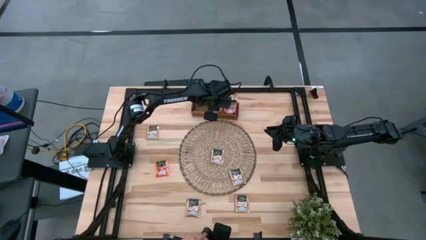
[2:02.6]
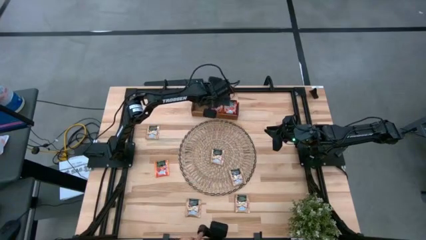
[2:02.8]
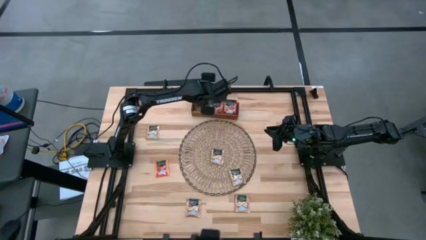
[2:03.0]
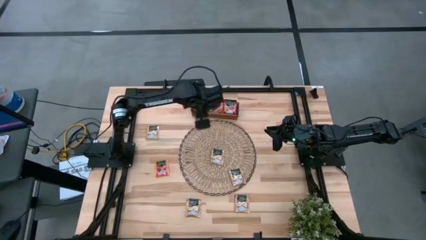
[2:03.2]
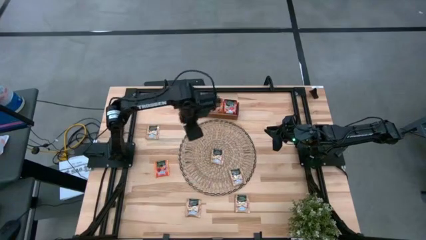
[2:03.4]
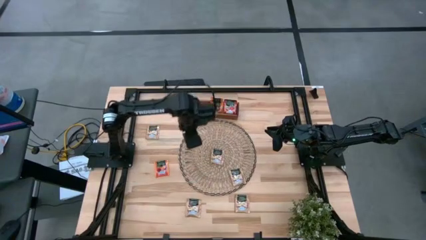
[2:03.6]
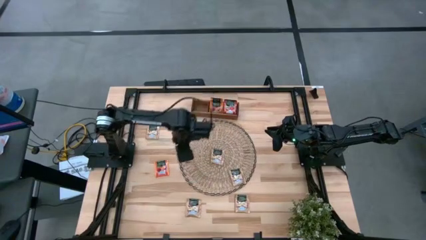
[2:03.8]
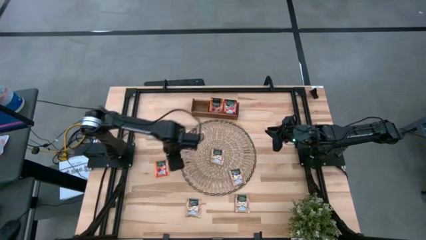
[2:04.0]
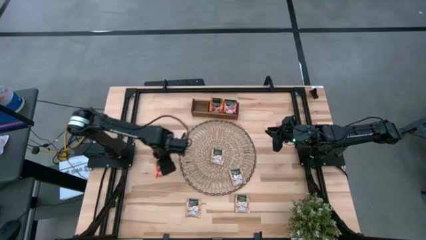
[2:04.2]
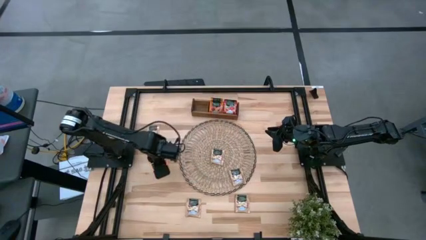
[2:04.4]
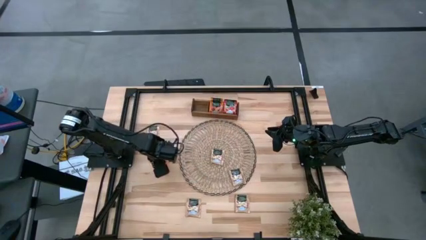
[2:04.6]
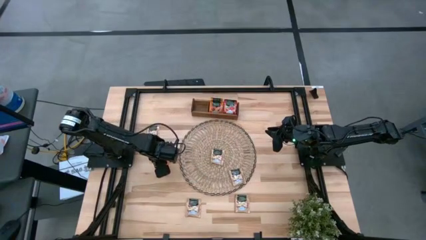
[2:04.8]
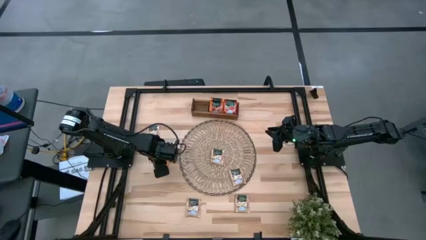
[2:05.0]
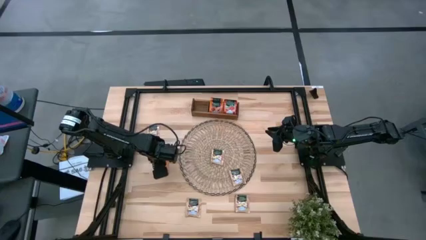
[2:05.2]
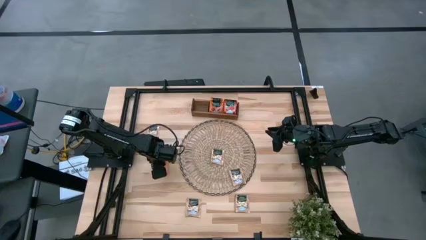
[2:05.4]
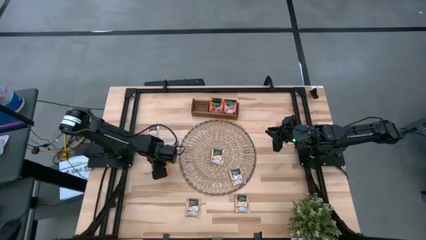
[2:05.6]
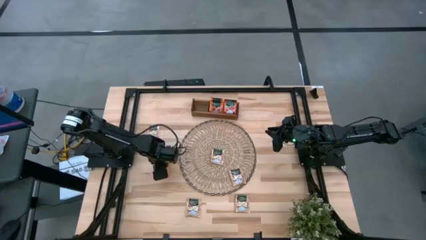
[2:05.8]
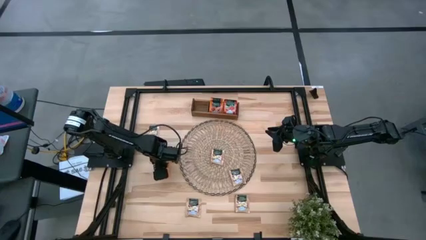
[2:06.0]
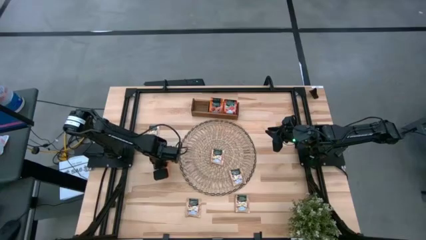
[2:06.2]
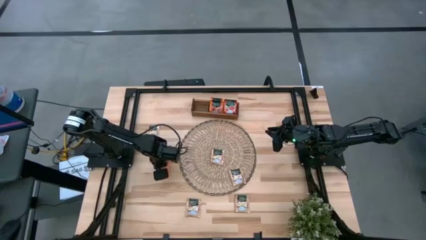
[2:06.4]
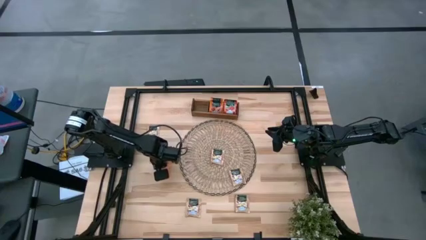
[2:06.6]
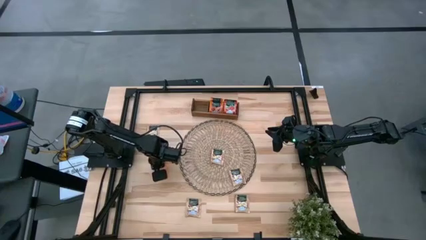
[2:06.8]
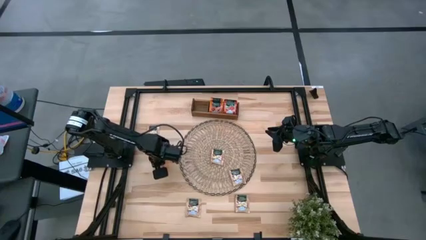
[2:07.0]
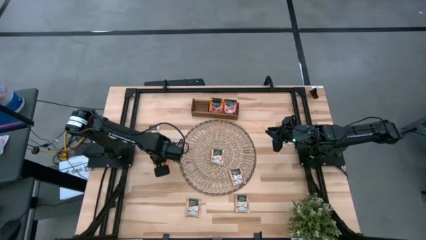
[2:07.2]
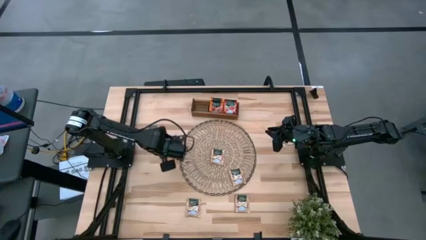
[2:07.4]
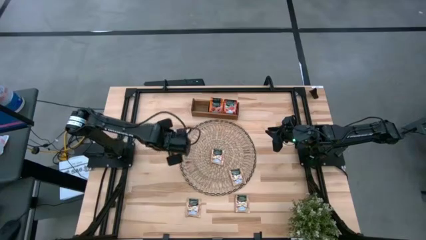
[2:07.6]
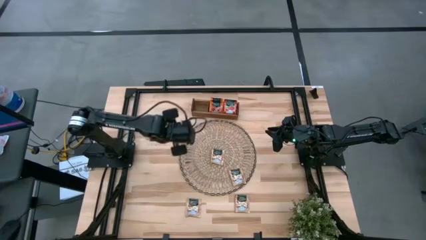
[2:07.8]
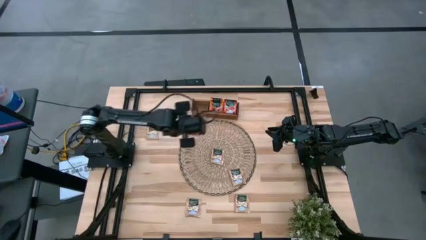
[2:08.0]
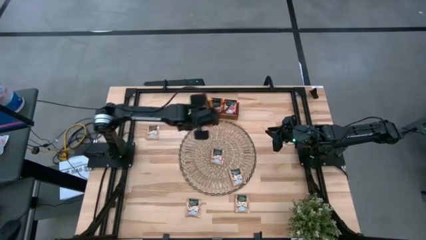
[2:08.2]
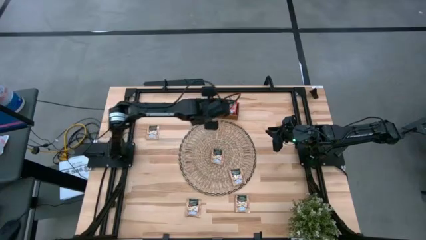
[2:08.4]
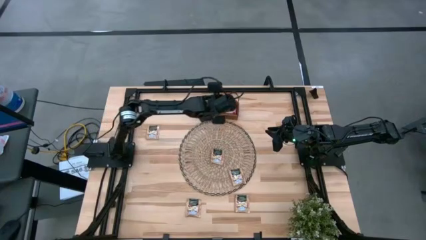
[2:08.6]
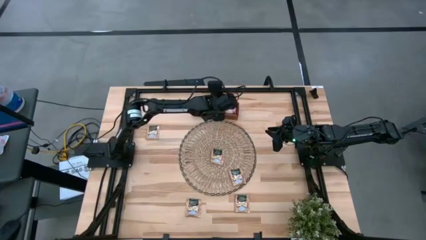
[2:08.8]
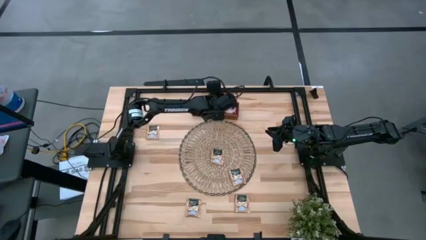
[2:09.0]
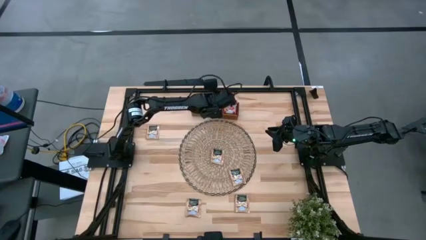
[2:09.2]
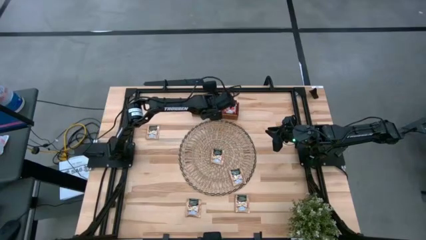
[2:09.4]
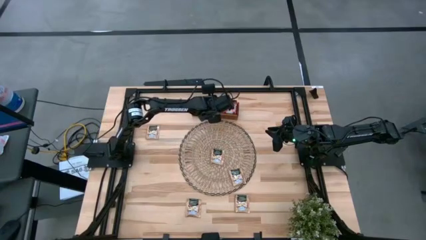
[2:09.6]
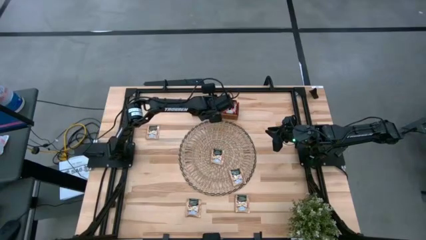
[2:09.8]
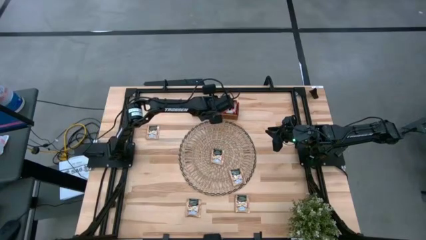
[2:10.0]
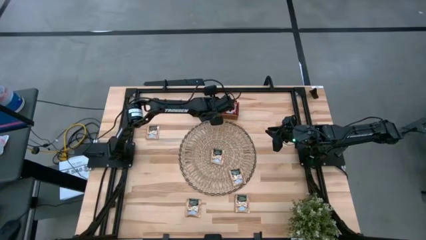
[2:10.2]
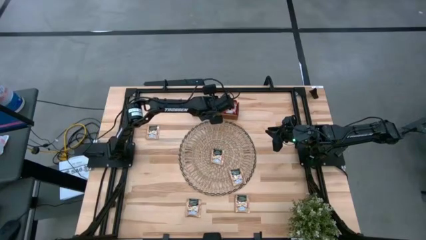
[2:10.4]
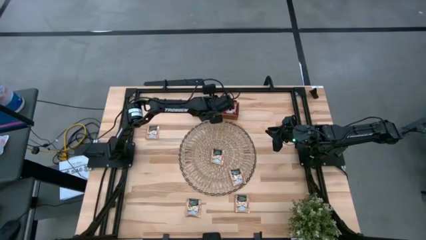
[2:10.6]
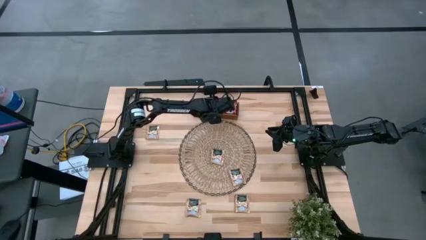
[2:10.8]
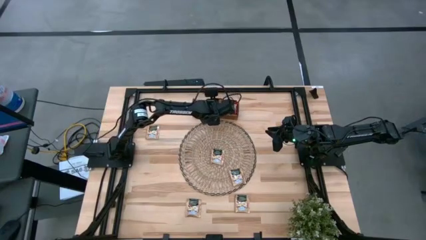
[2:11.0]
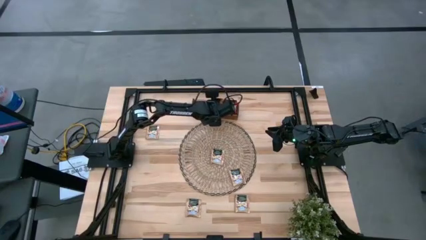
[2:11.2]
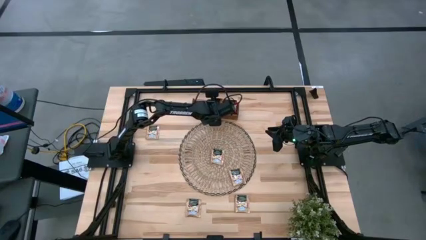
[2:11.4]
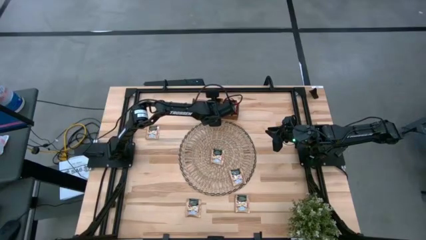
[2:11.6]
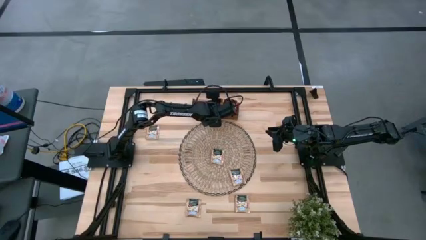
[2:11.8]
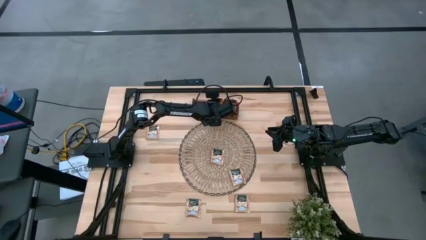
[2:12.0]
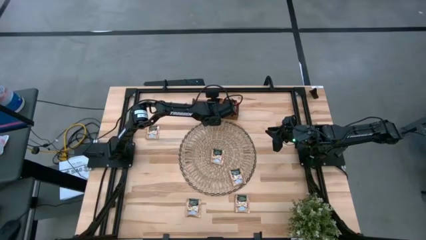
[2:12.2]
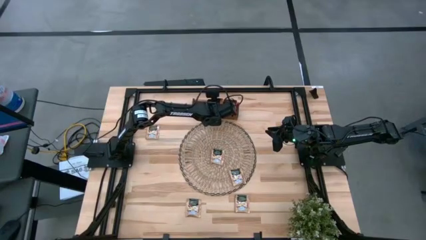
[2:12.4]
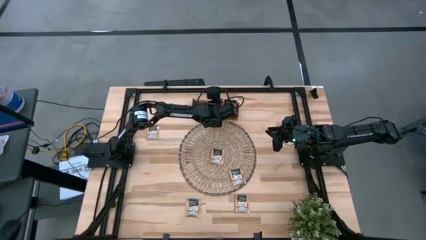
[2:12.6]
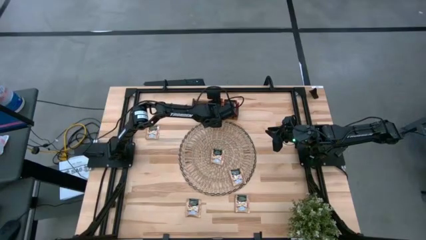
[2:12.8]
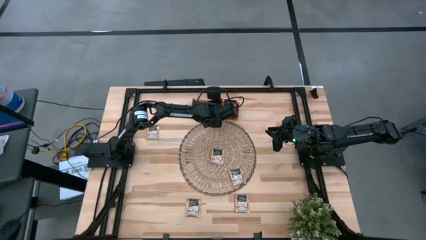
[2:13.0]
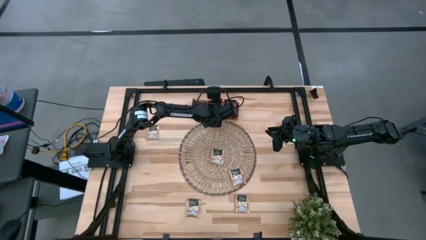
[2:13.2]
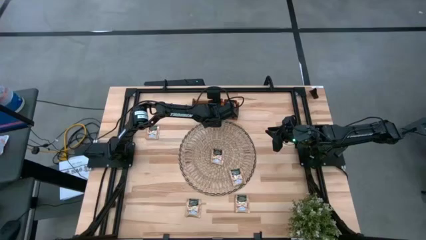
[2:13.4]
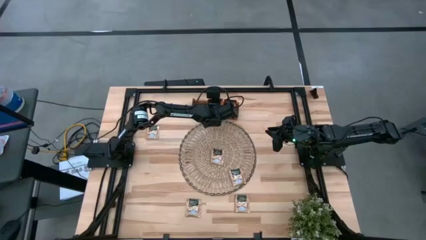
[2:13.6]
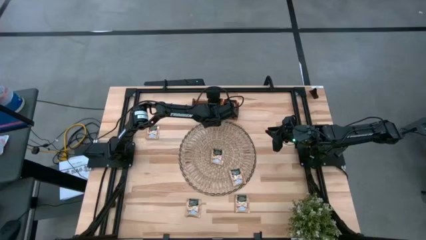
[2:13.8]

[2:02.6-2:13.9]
Task: Pick & Place Tea
Put the orange tea bag into the middle section of the wooden organizer

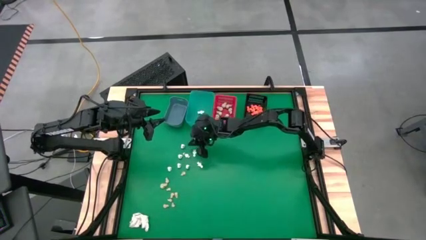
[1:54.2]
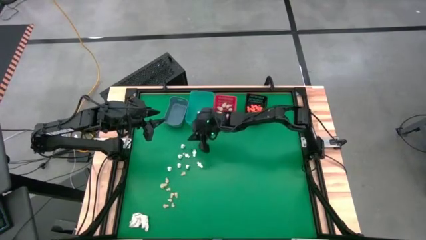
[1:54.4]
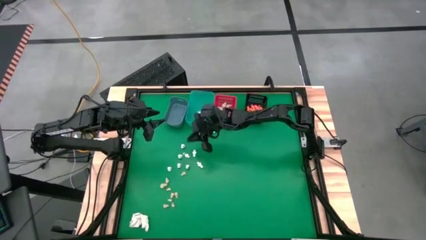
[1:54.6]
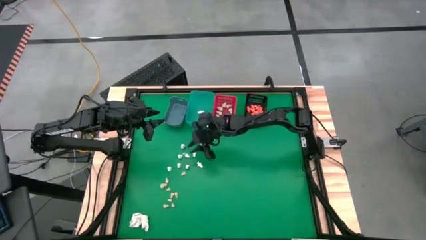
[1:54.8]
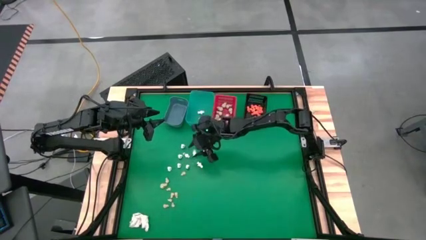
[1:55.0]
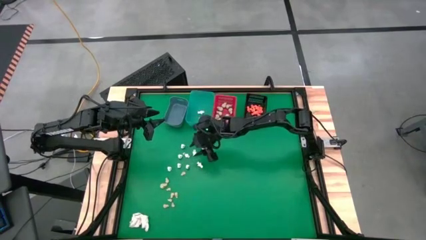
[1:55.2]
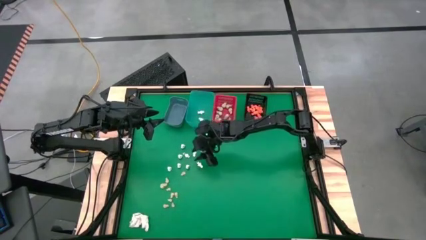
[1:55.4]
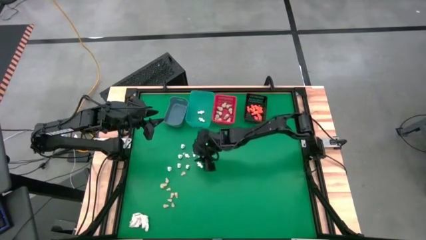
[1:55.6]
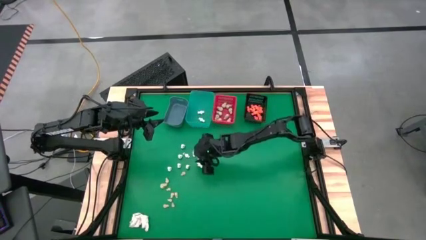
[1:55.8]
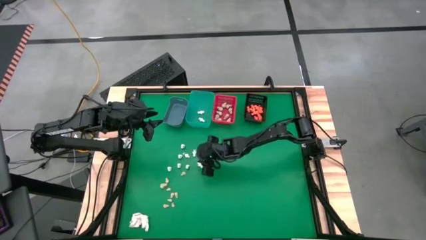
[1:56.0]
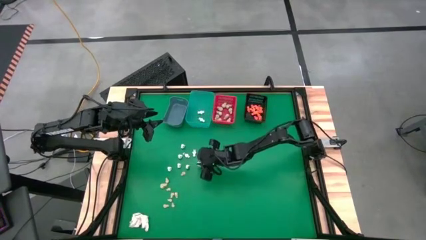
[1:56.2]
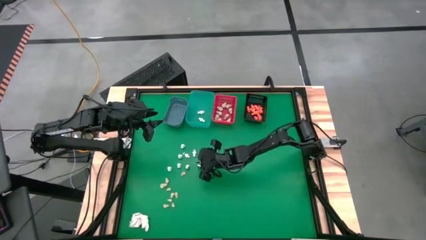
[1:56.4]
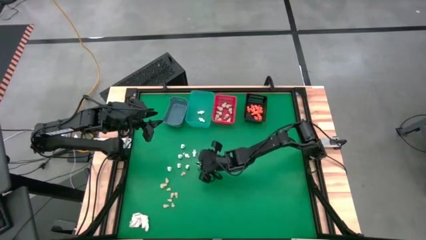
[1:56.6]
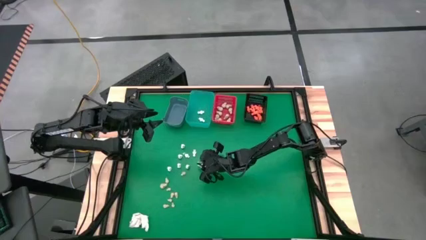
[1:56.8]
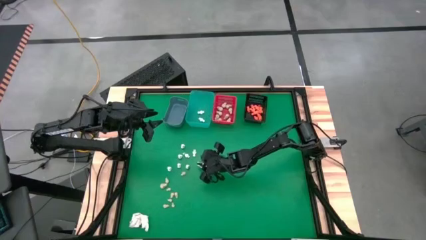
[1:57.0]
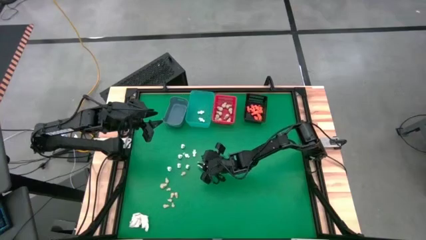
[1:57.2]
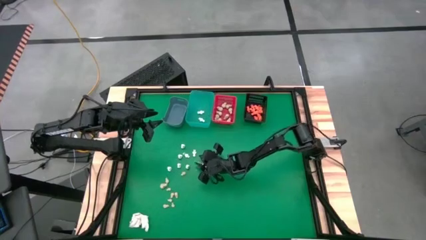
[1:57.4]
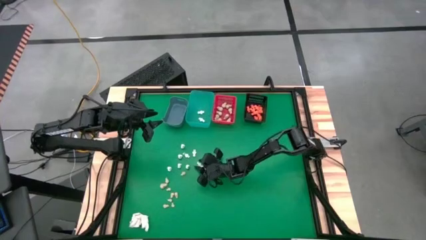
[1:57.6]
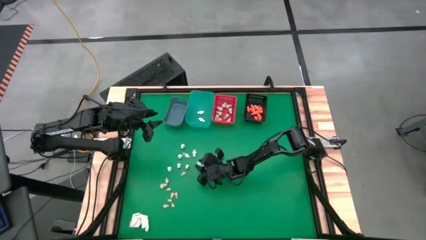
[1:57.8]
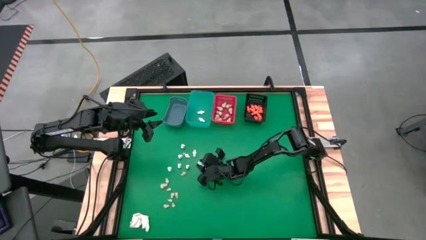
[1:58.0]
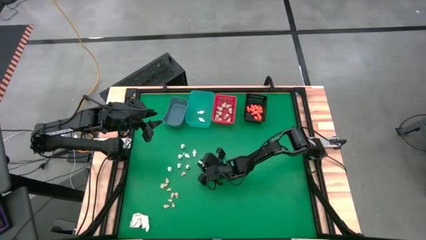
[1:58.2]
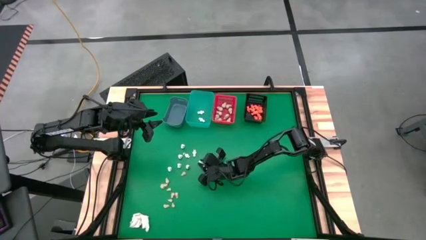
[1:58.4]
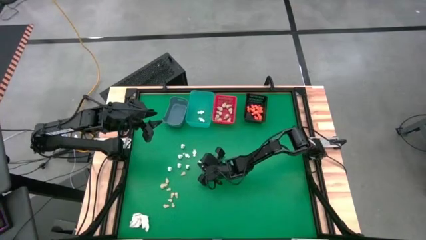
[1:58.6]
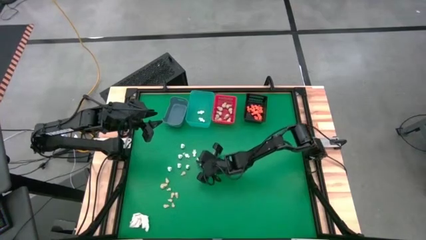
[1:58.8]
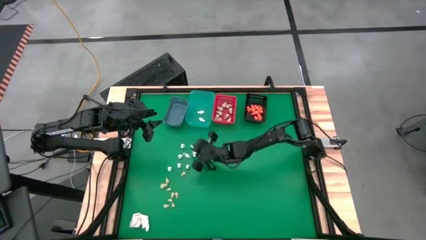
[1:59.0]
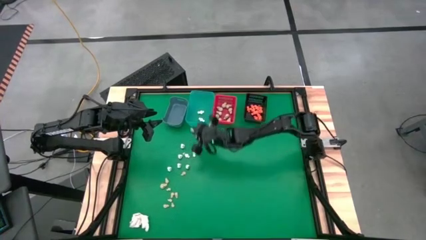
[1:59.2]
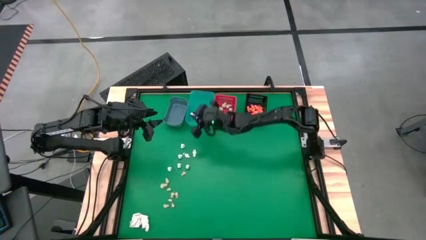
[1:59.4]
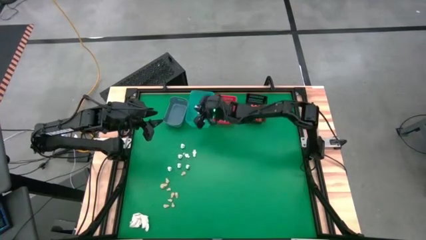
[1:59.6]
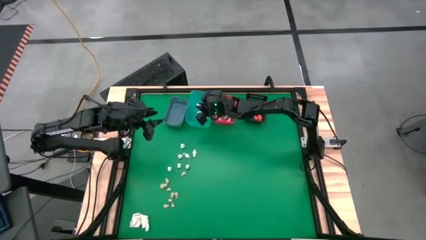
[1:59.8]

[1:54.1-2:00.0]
Task: Sort Halloween decoration
Put the white skeleton toy into the light blue bin
